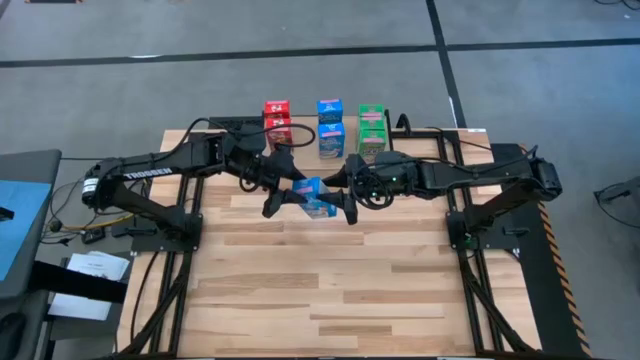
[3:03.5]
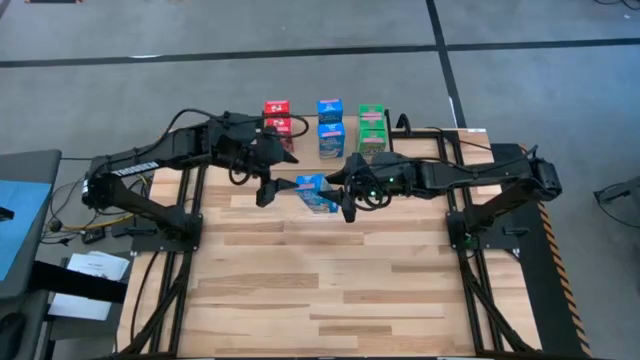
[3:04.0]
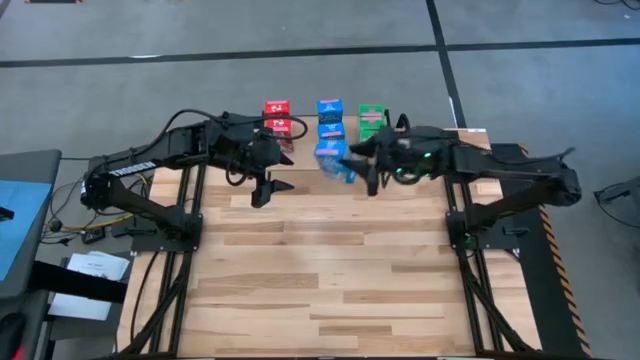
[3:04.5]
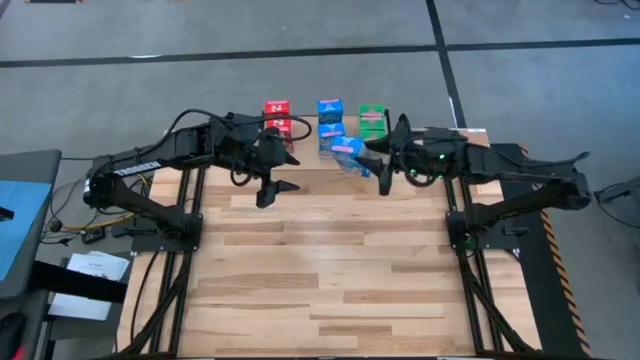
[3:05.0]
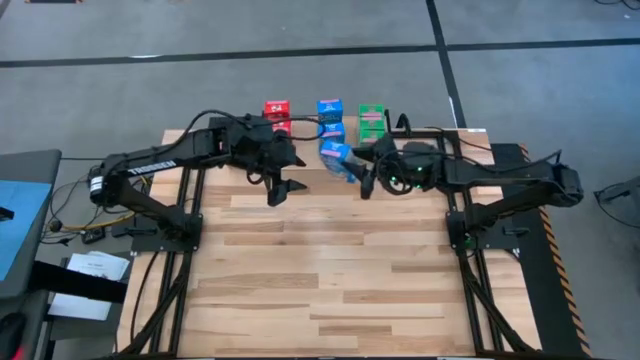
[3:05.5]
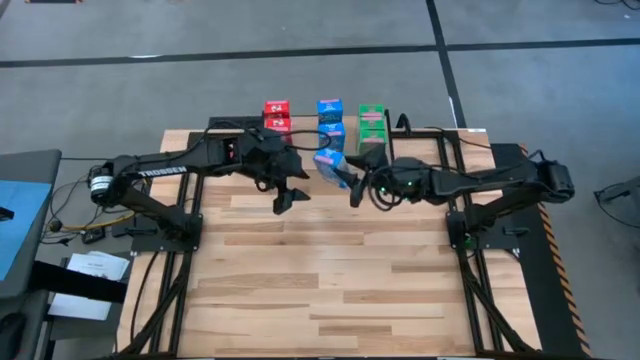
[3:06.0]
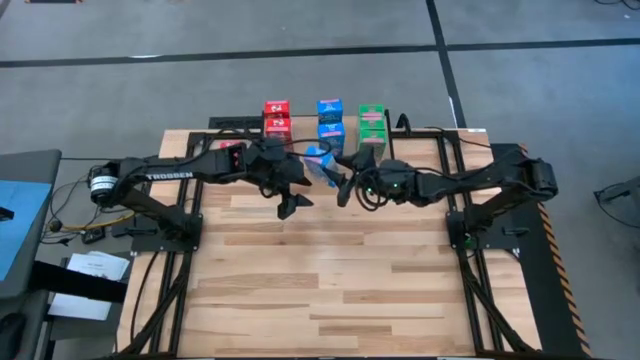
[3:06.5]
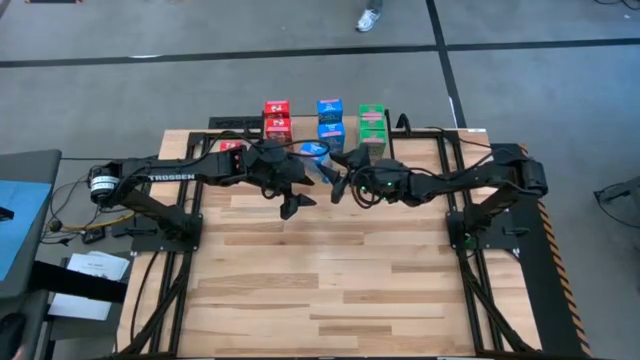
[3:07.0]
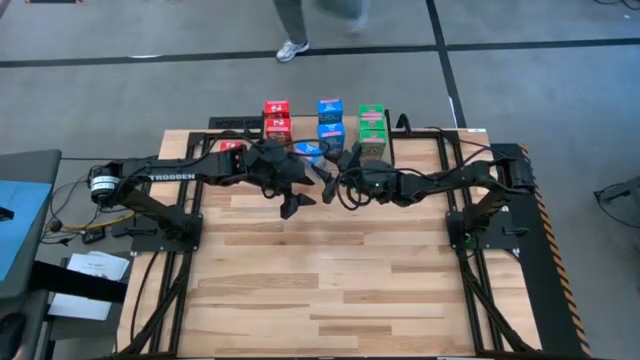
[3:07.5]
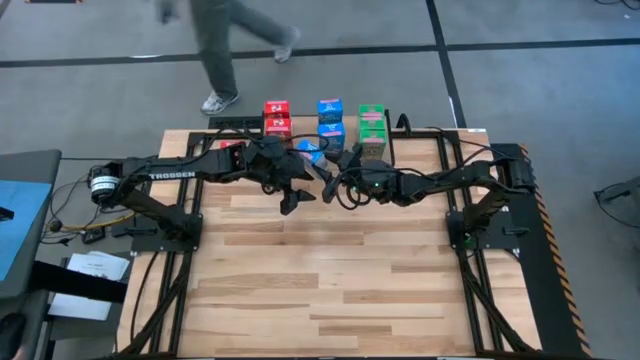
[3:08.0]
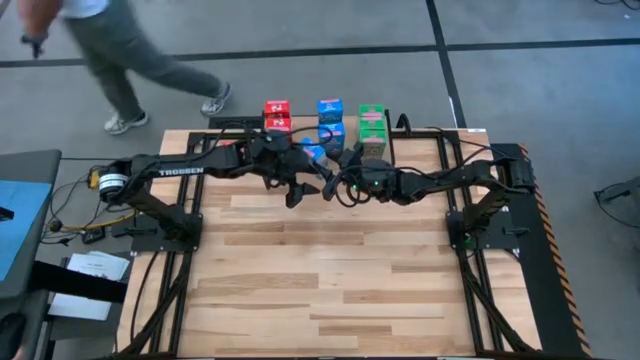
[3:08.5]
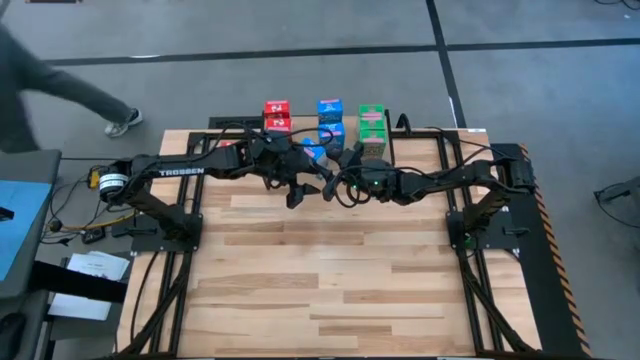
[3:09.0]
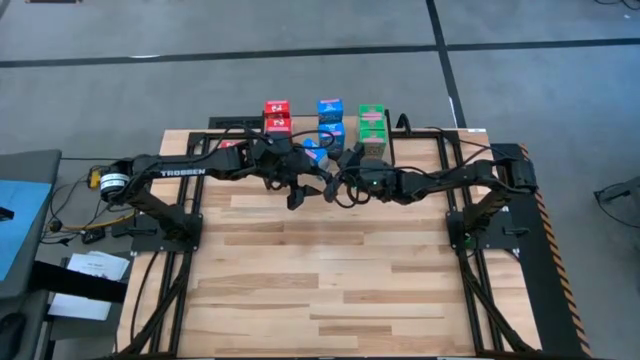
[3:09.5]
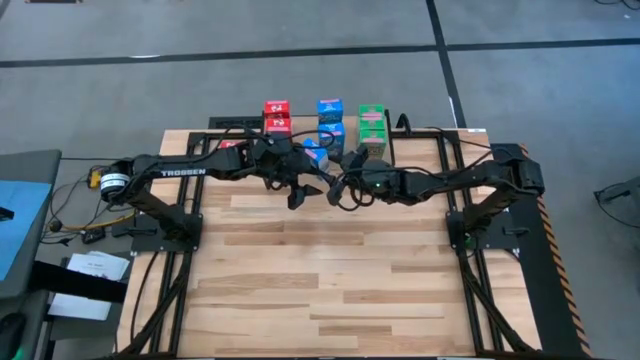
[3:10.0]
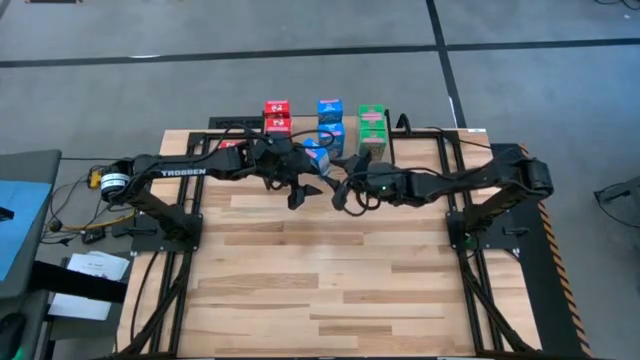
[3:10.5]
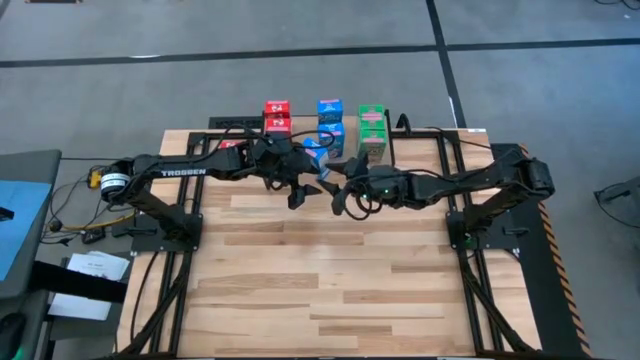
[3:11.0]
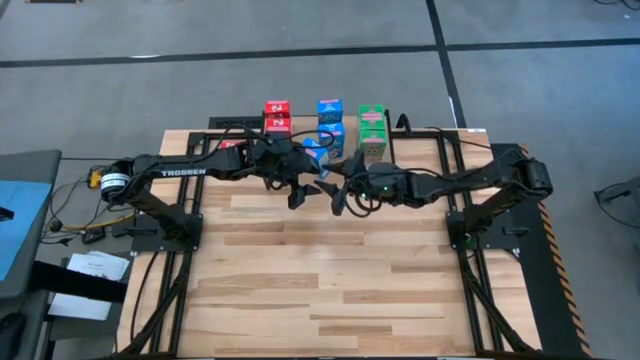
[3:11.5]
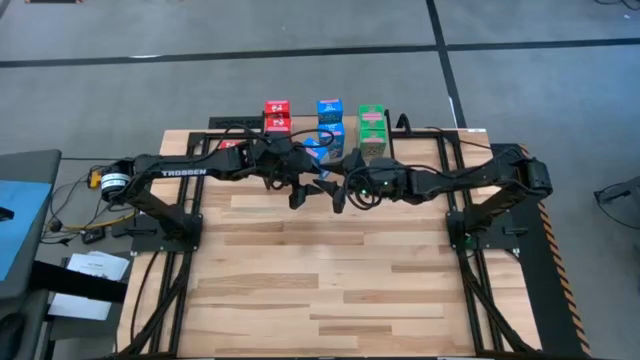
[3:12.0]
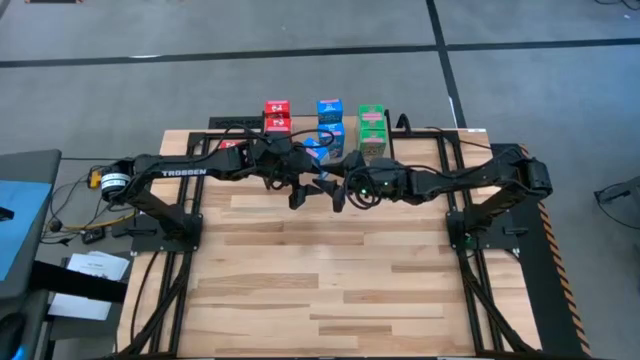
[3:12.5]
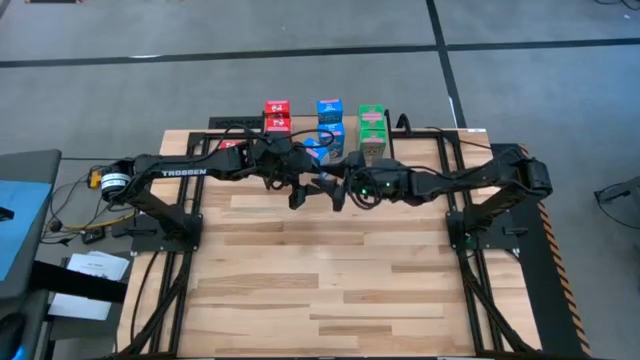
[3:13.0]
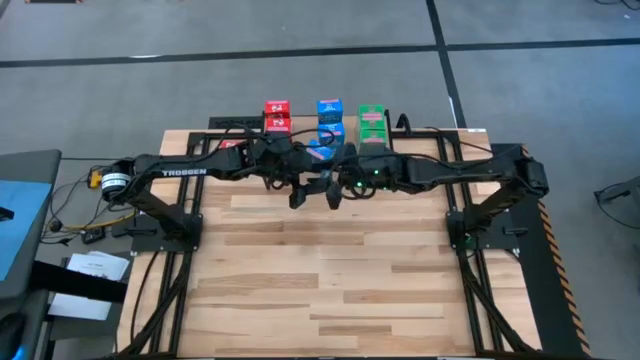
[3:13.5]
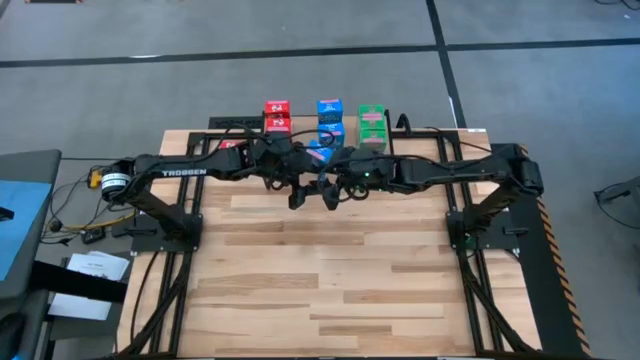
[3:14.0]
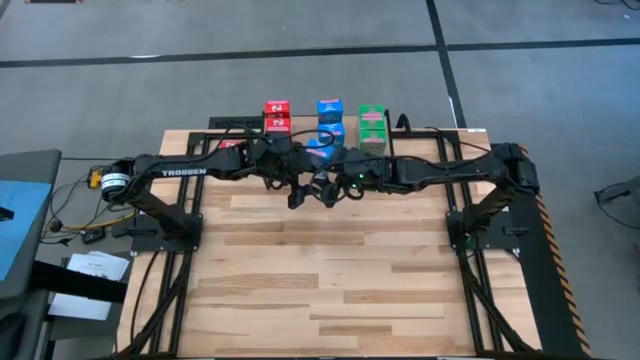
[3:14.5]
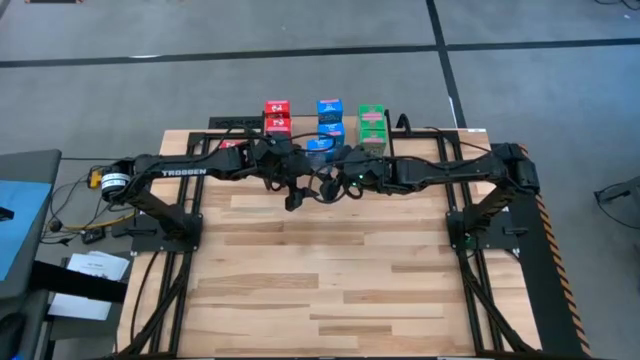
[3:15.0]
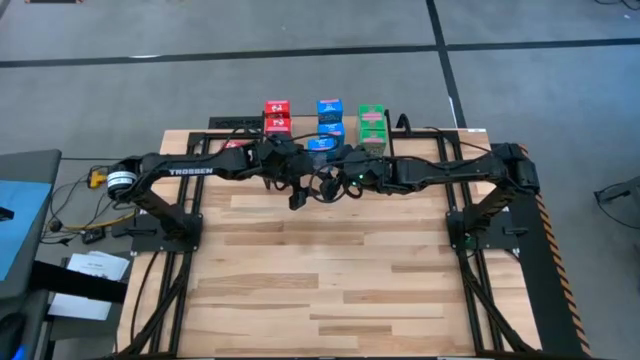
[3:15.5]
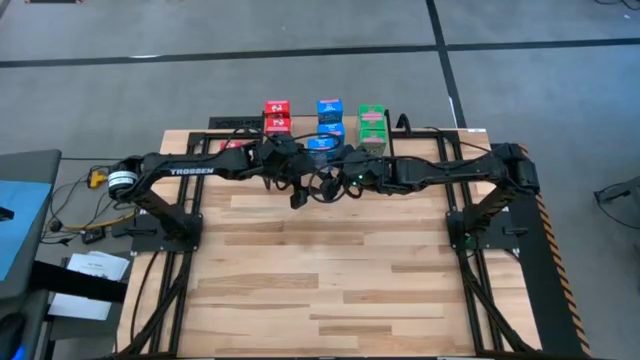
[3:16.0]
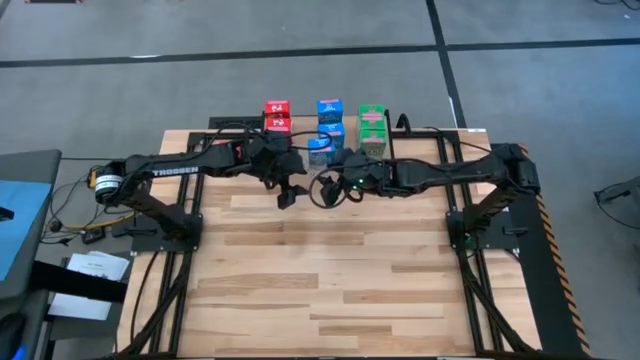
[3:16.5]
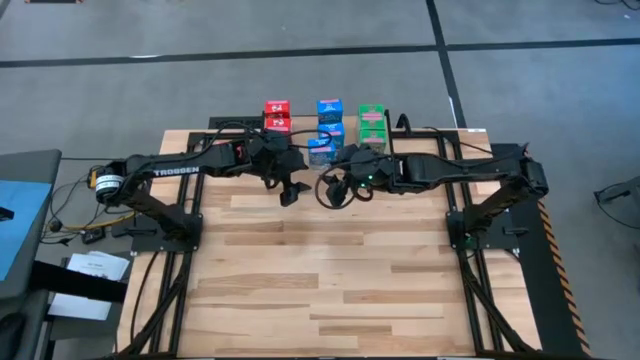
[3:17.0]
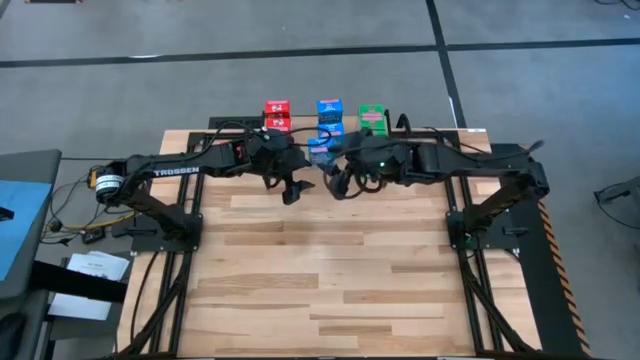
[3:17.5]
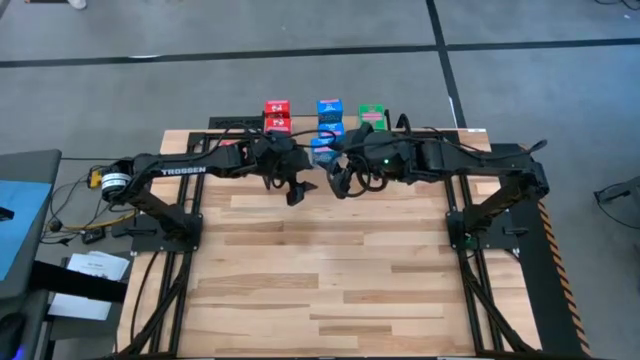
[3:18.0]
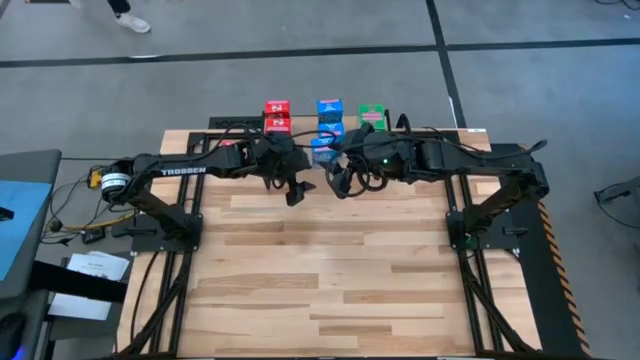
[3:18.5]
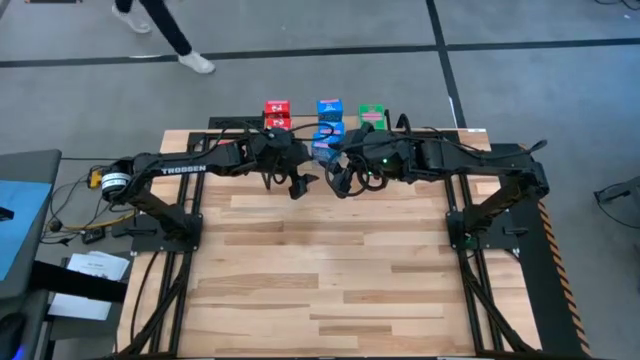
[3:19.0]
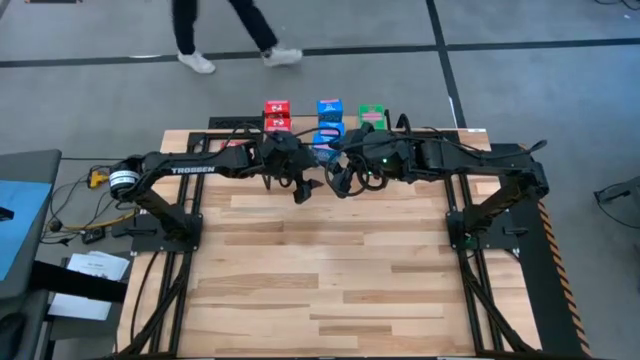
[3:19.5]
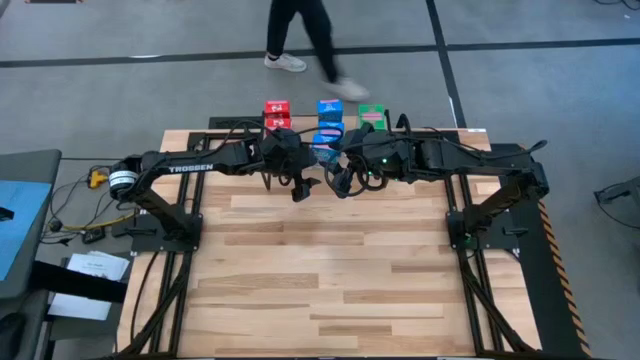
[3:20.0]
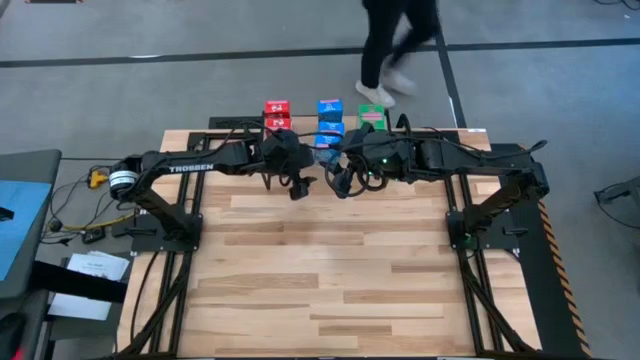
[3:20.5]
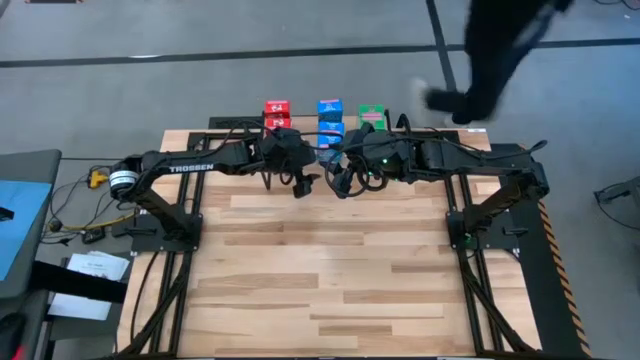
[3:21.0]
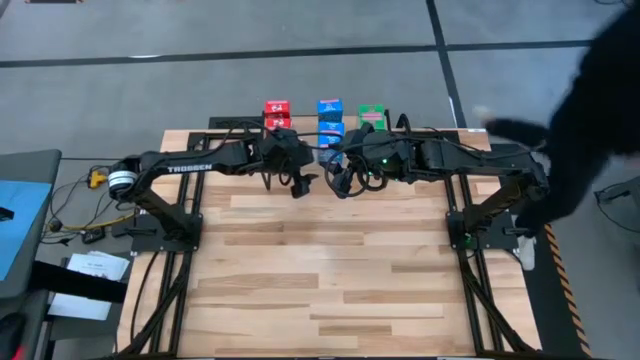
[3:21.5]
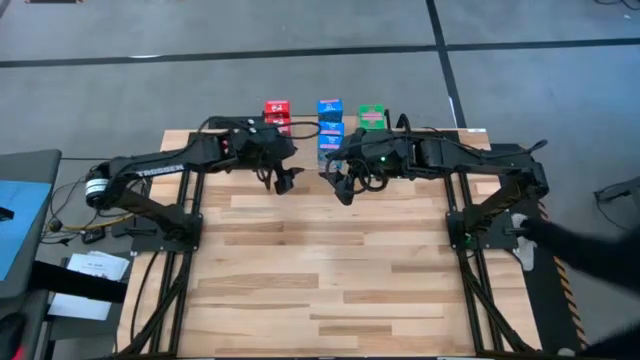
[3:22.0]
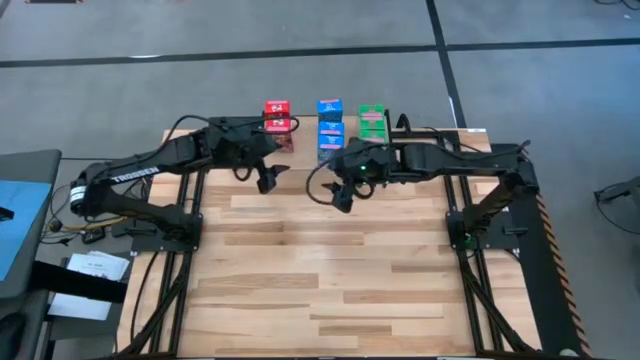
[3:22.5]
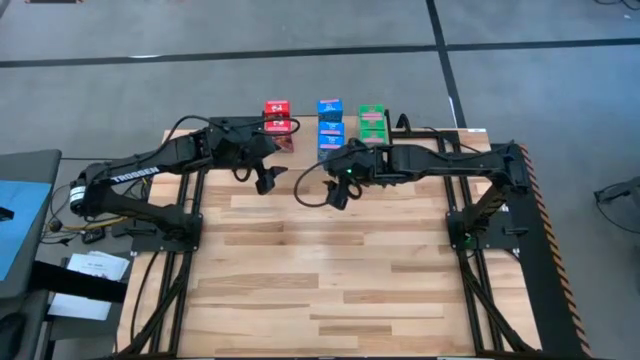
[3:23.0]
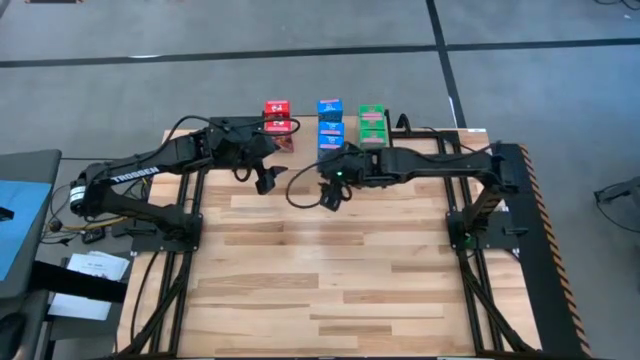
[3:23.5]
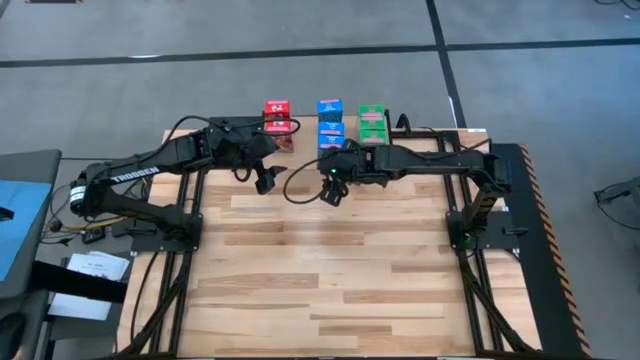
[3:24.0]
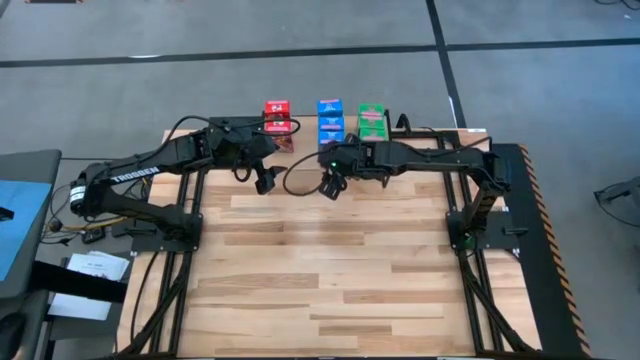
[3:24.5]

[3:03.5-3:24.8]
Task: Stack cereal on shelf
Put the blue cereal box on the shelf aligned with the other blue cereal box
